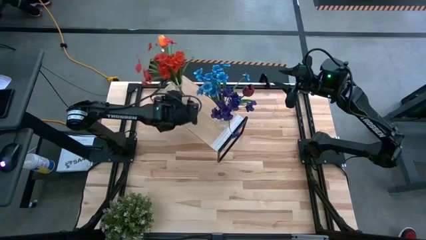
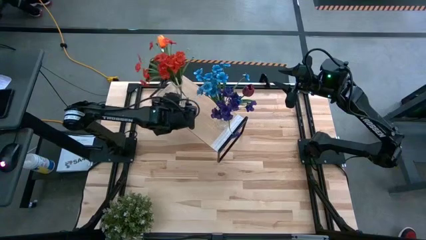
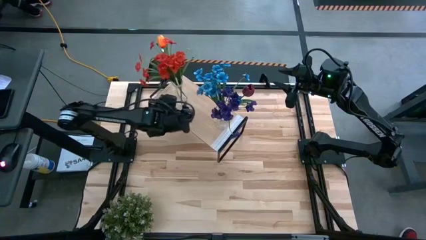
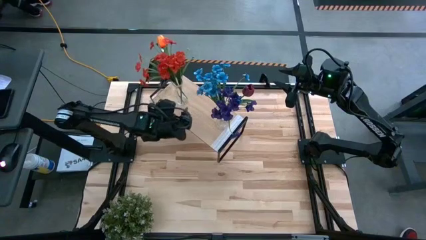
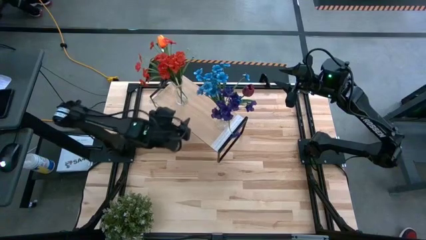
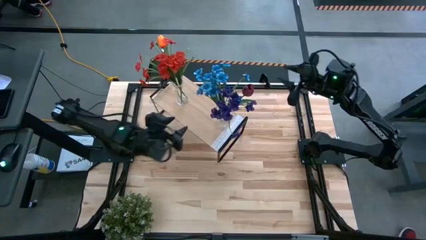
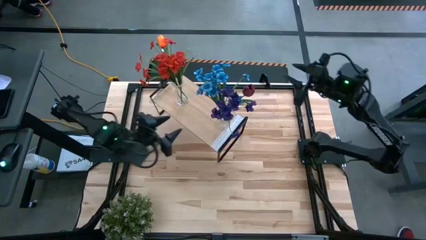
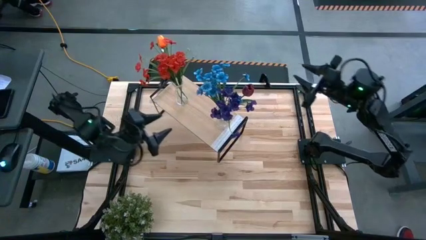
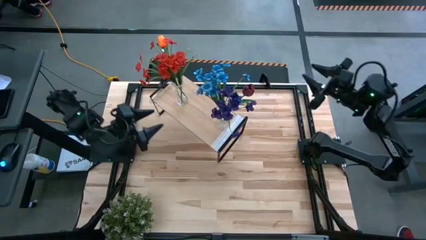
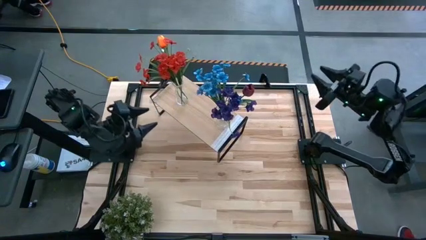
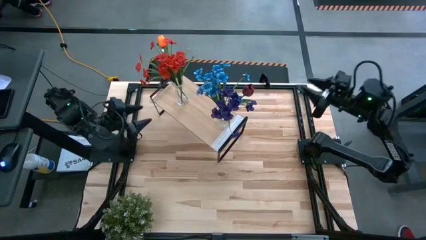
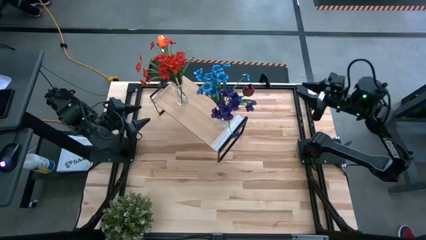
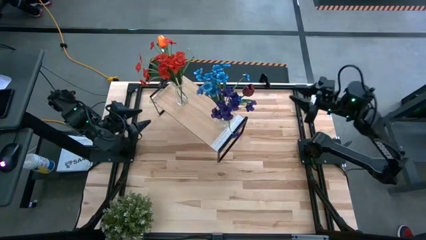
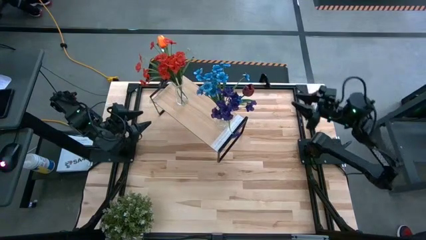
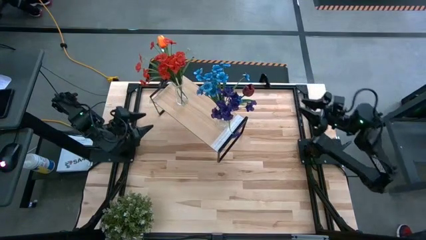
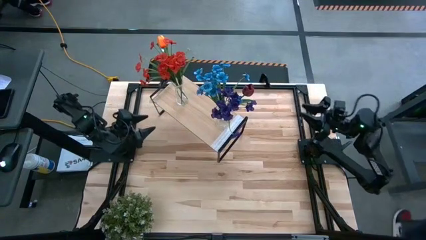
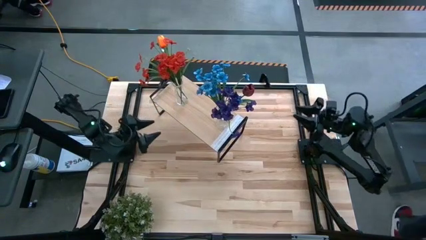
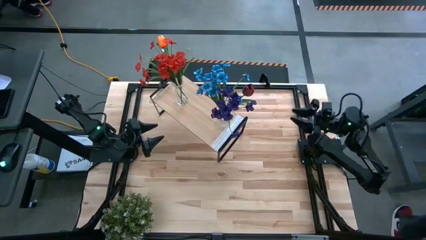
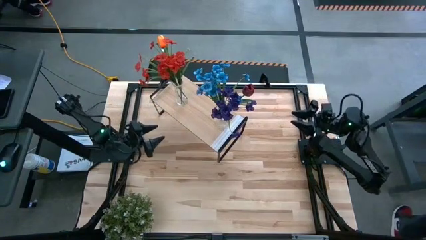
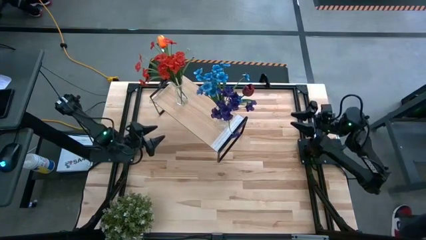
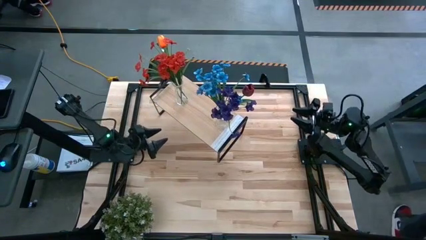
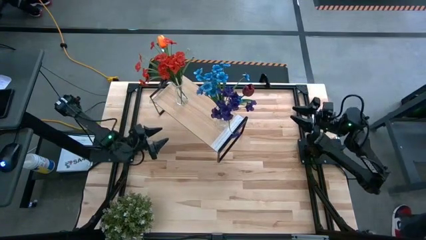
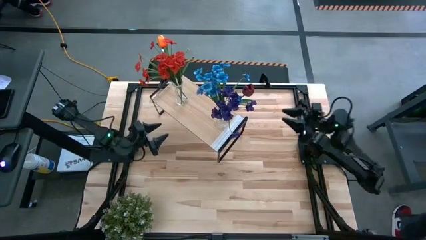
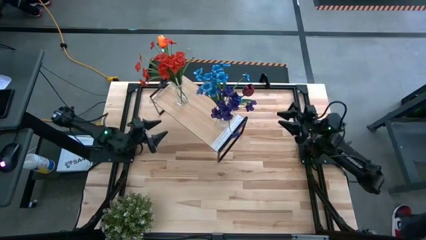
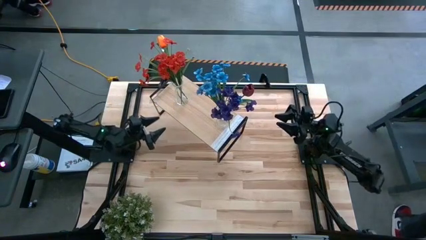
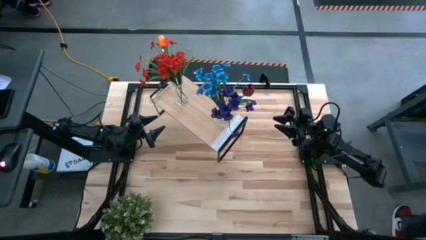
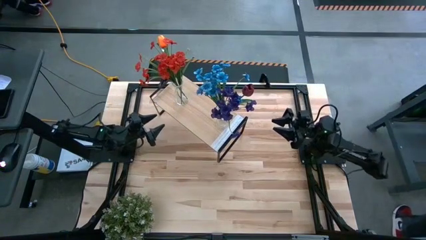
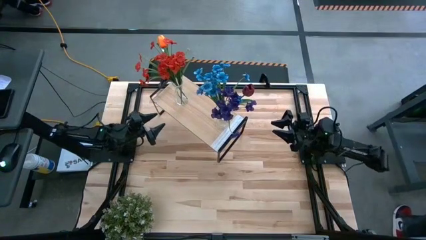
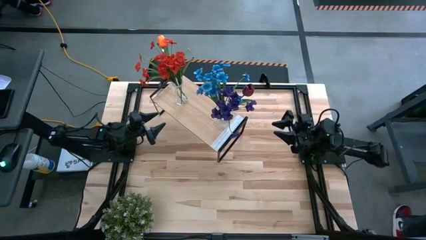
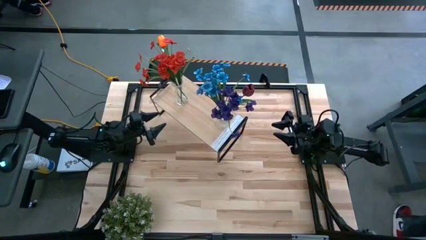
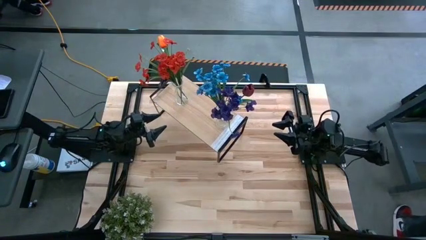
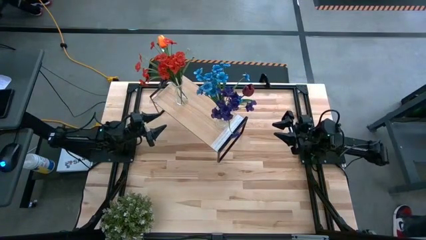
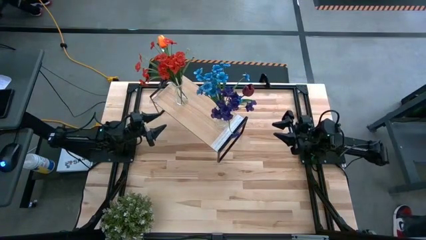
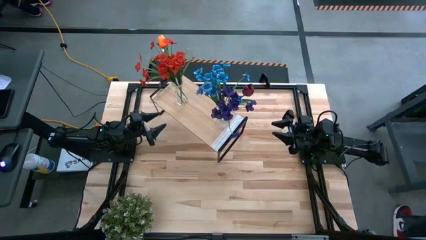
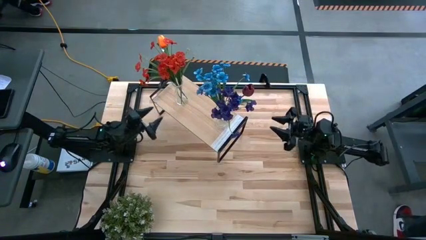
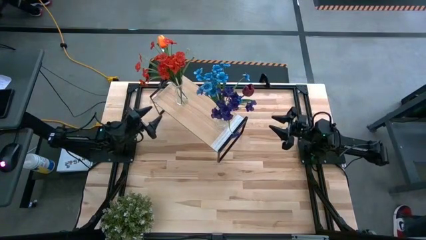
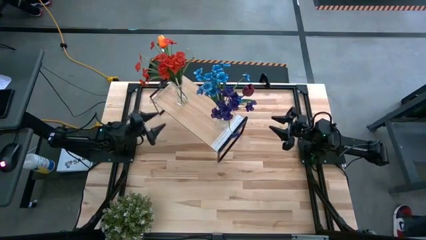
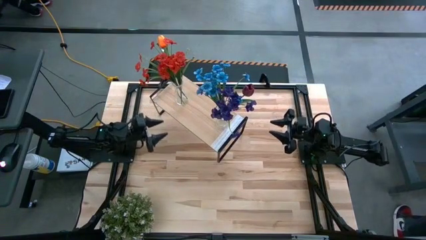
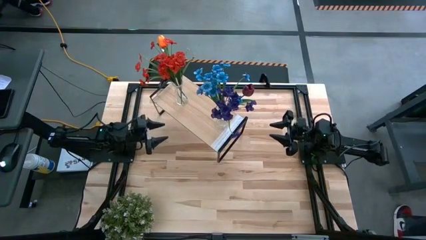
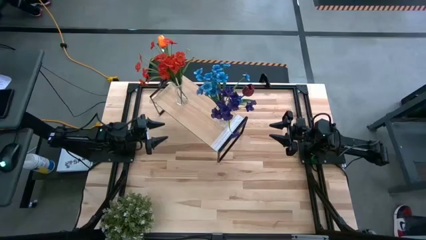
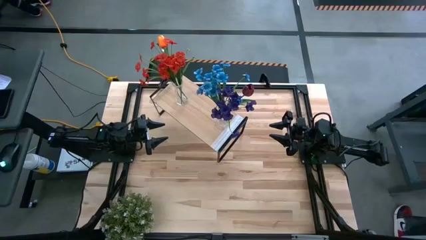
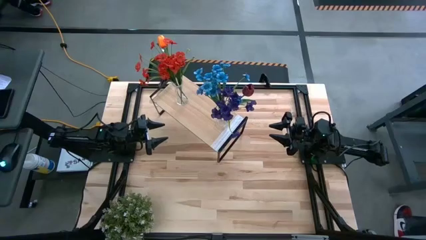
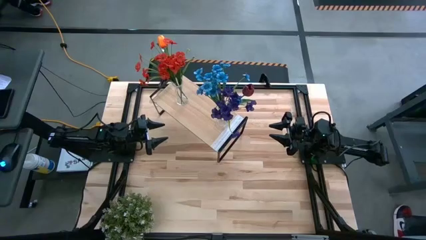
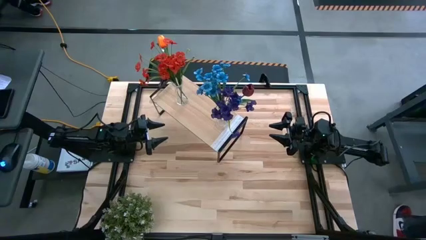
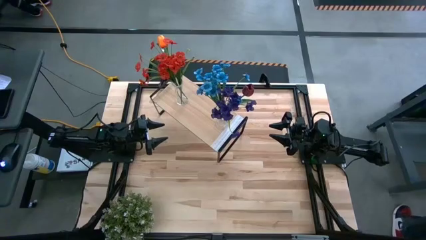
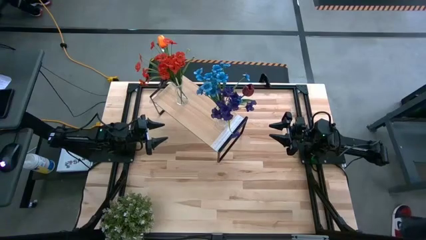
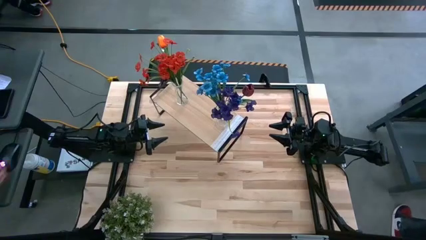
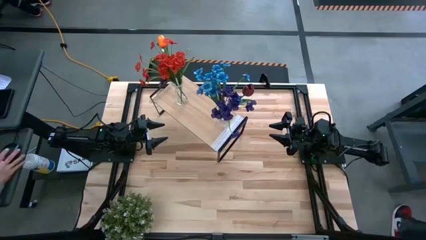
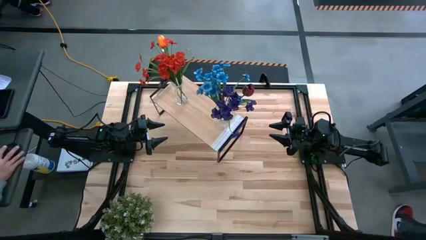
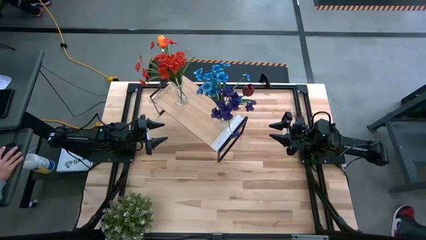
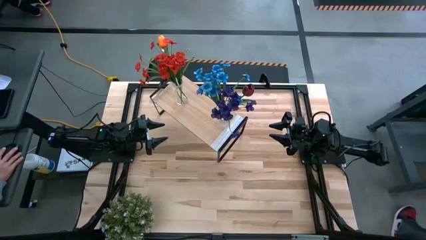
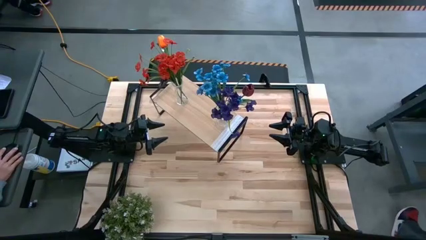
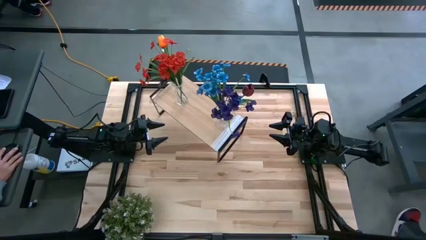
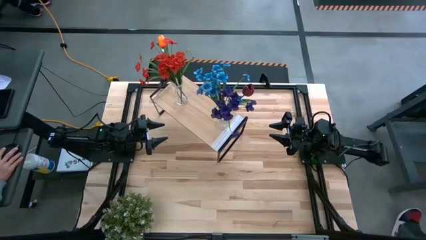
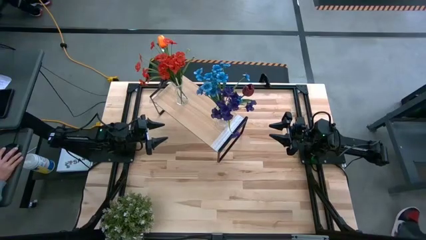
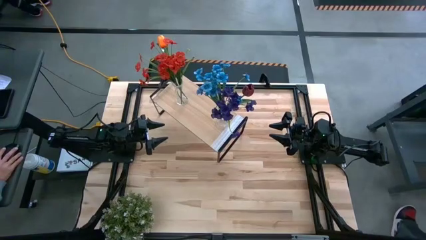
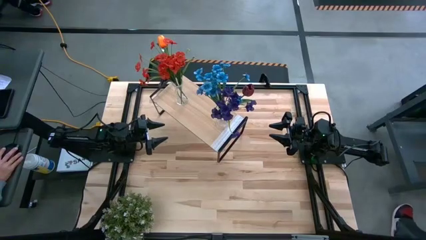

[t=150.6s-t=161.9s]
Task: Pick and place flowers into a vace then onto a shelf
Return to Home Position

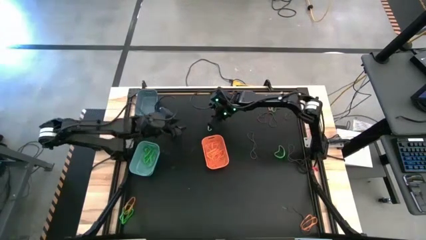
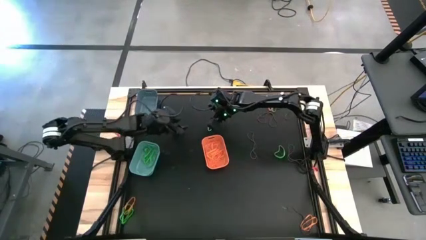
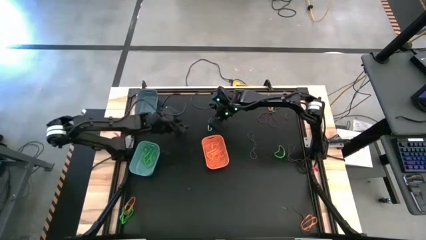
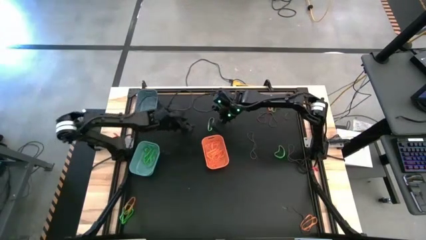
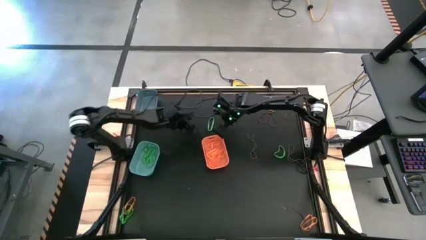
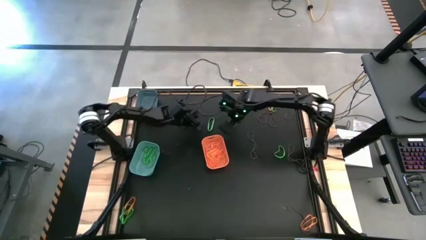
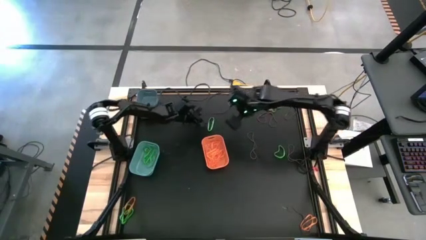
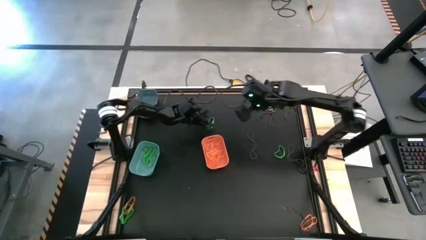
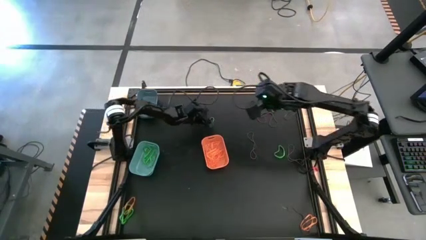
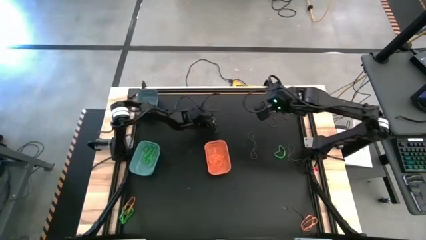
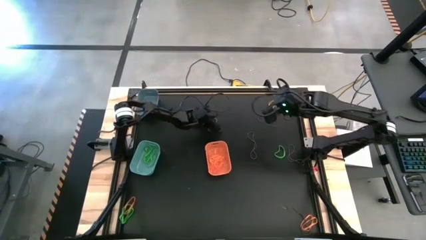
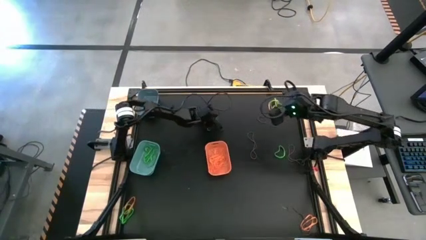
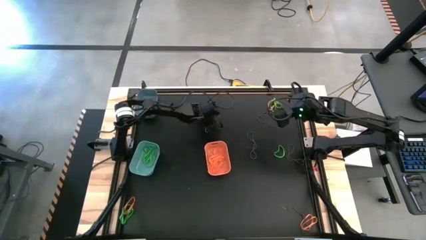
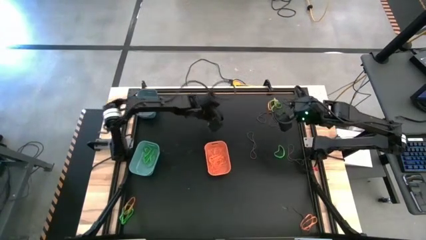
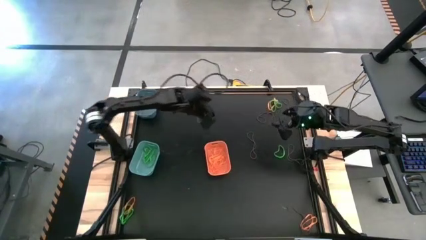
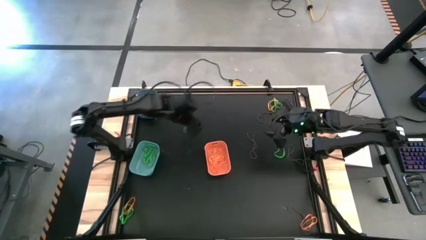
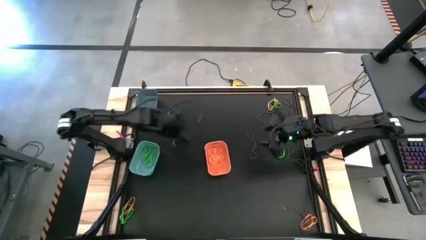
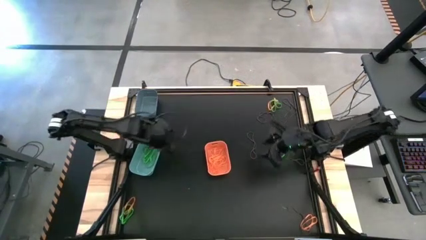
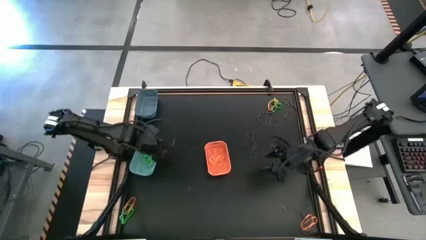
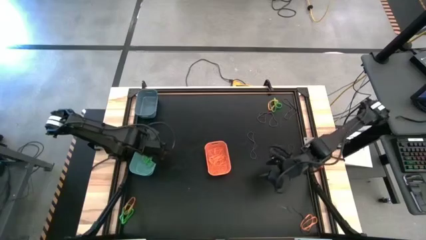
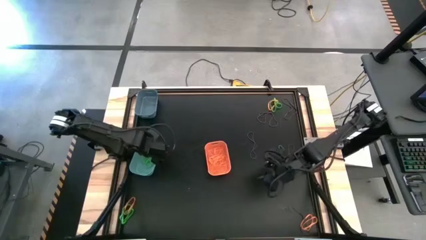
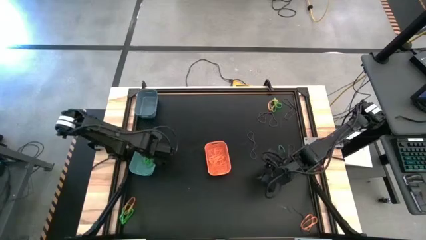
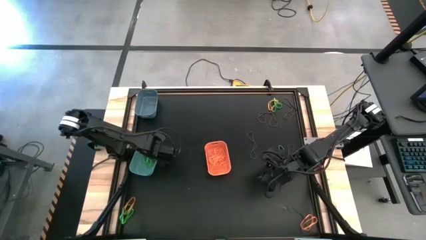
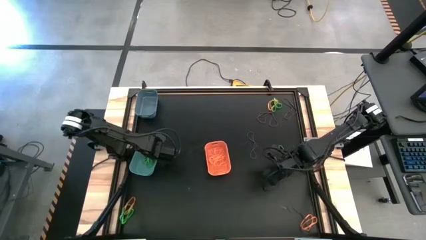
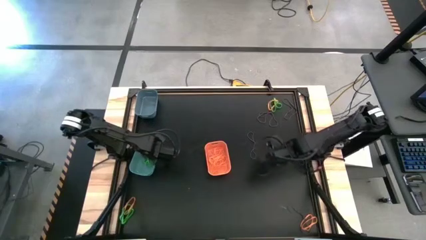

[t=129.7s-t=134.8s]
Task: Sort rubber bands into baskets
Put the green rubber band into the light sea green bin

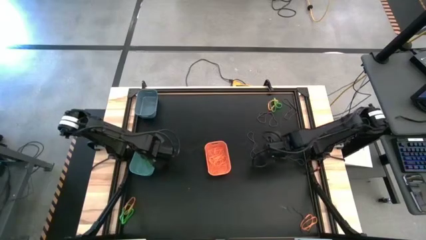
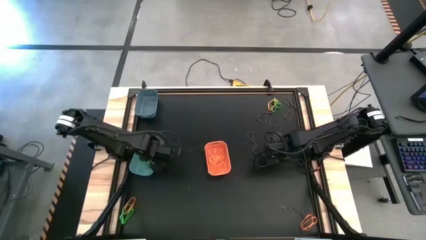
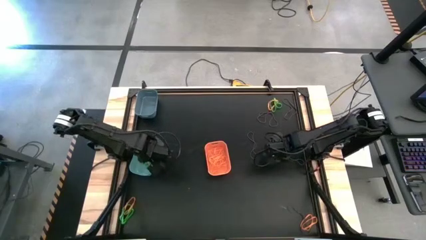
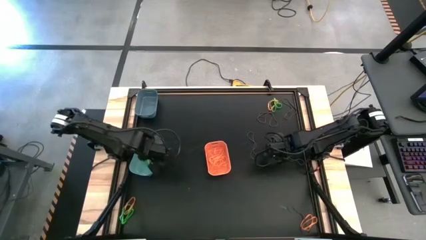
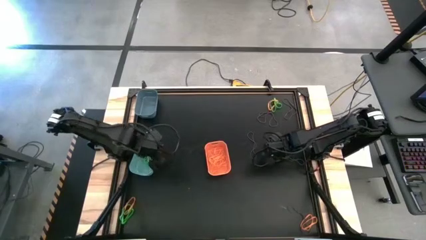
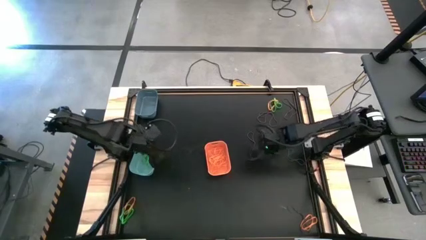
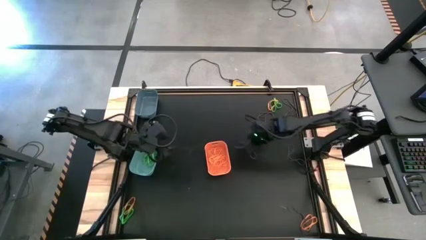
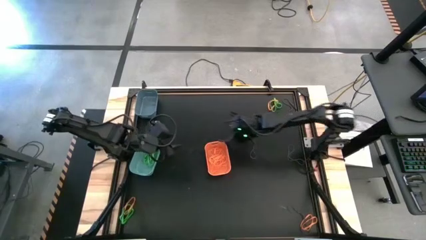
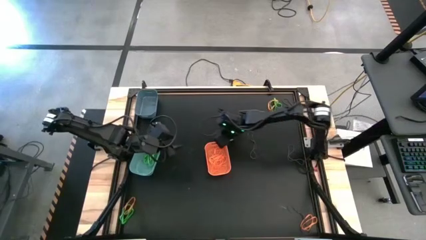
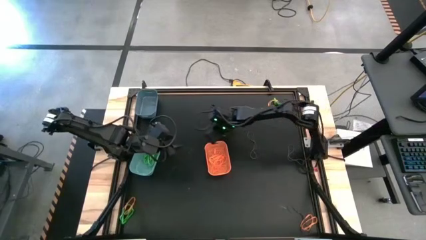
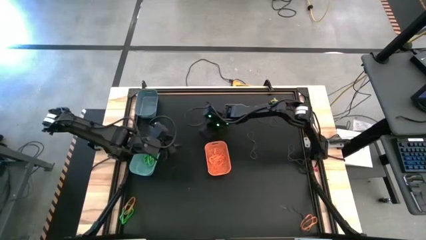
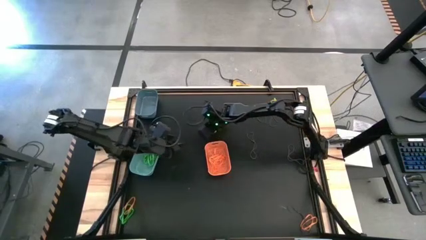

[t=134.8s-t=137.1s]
Move the green rubber band
